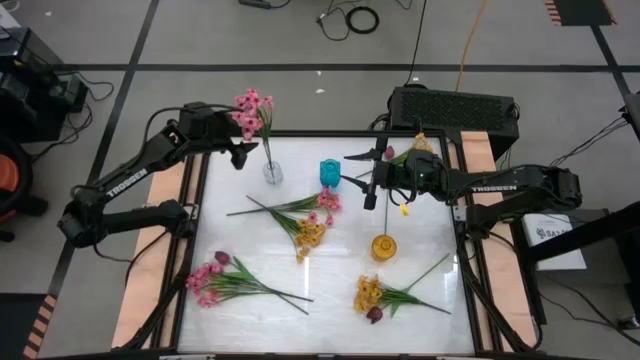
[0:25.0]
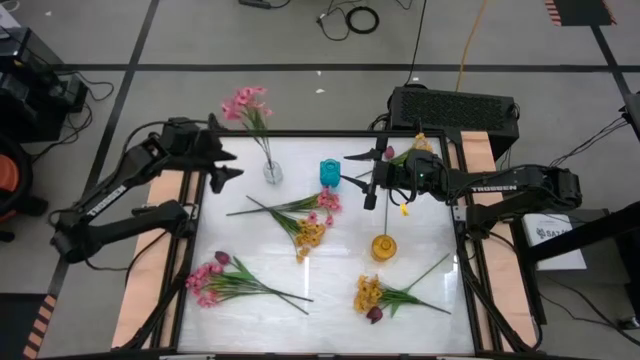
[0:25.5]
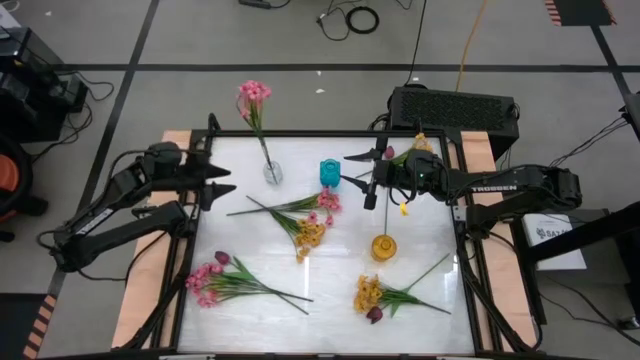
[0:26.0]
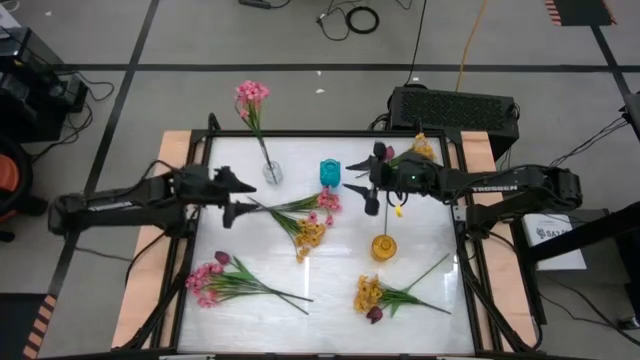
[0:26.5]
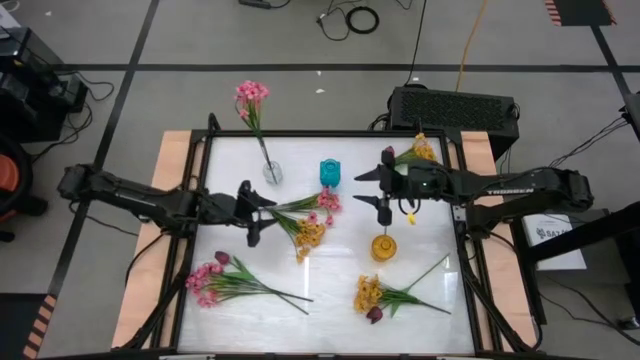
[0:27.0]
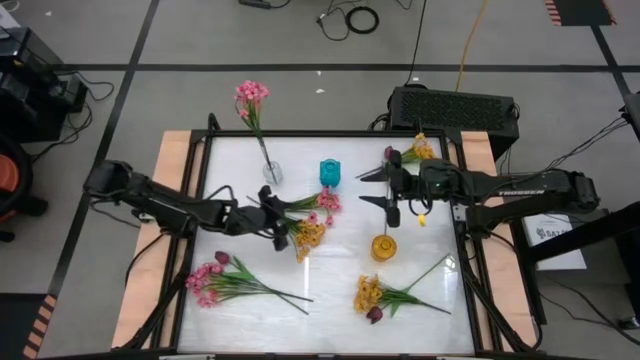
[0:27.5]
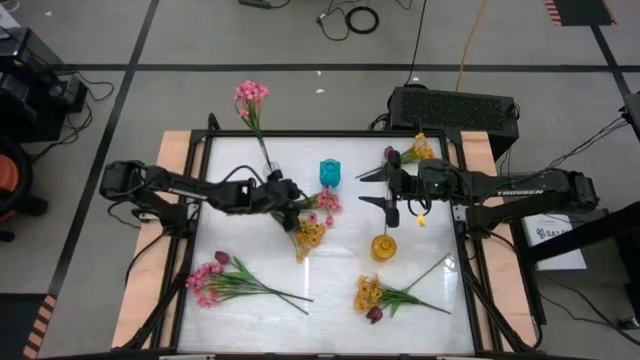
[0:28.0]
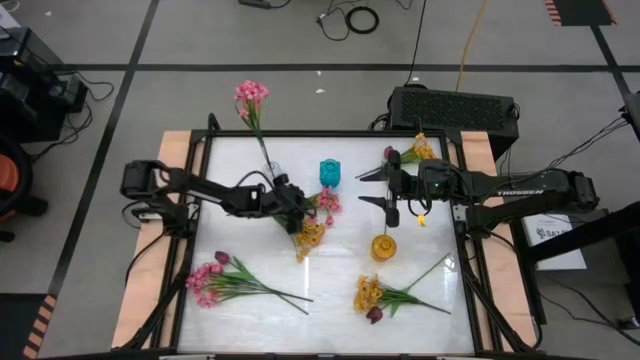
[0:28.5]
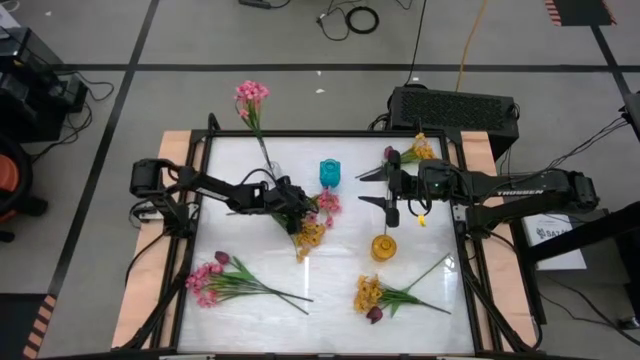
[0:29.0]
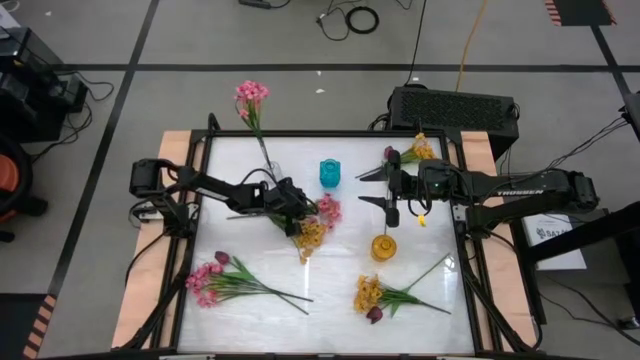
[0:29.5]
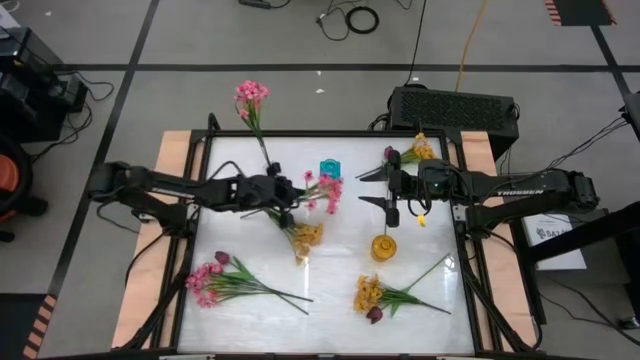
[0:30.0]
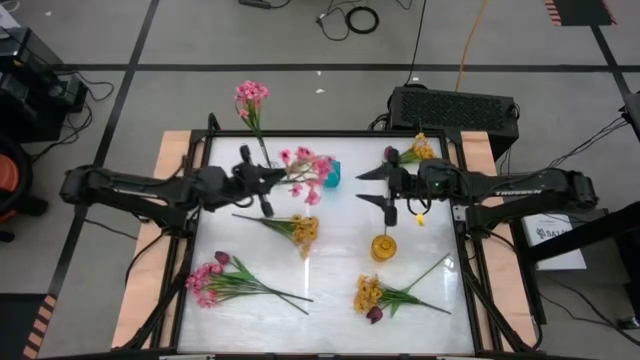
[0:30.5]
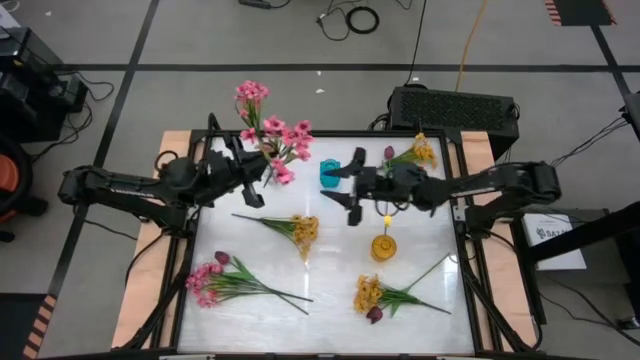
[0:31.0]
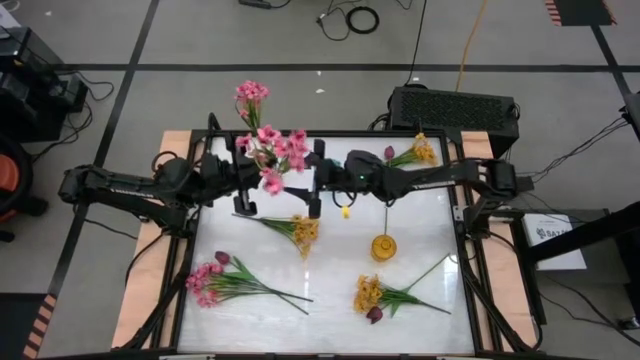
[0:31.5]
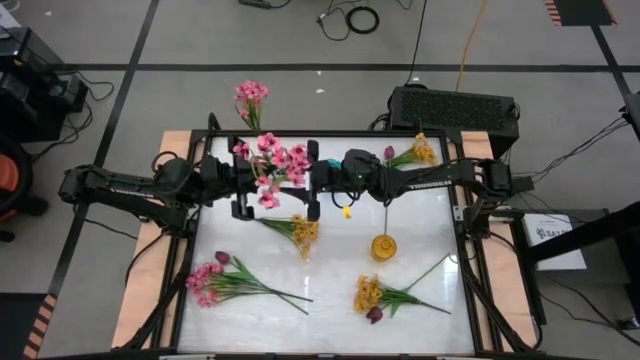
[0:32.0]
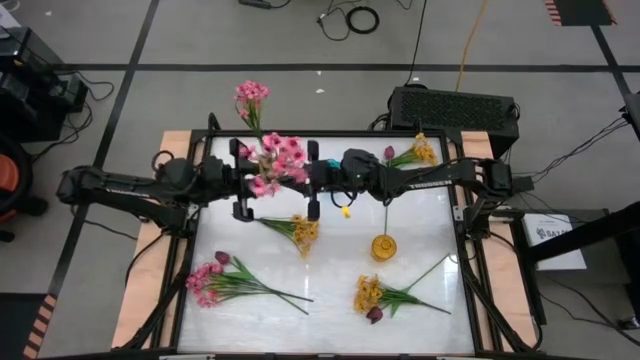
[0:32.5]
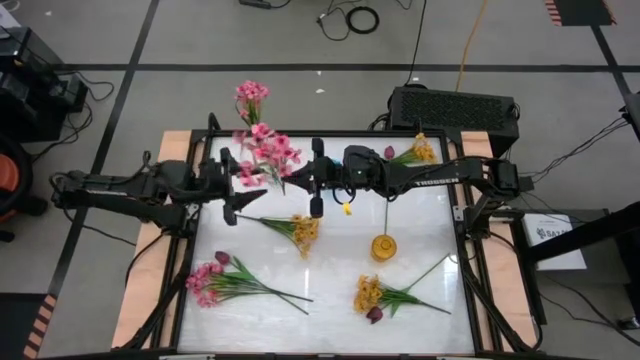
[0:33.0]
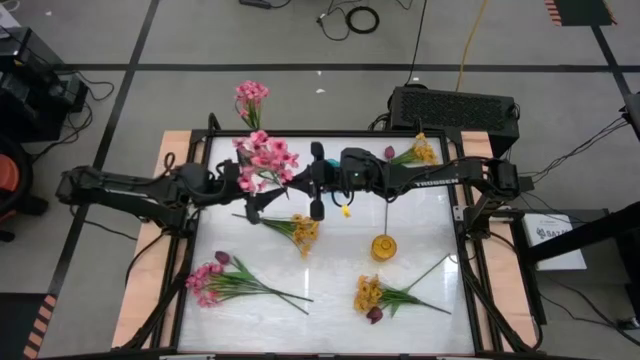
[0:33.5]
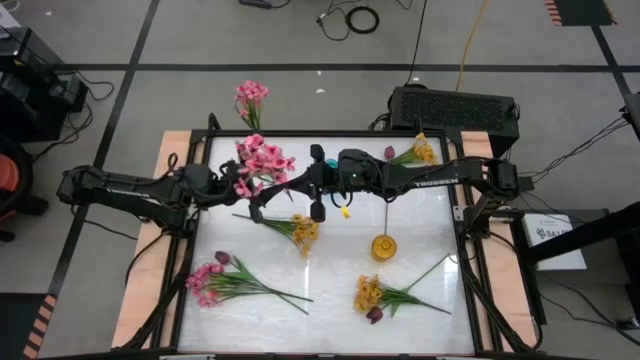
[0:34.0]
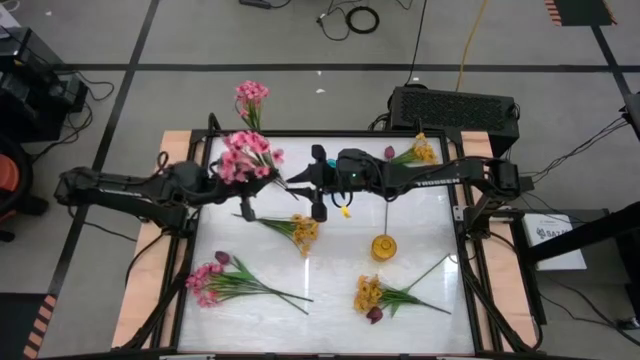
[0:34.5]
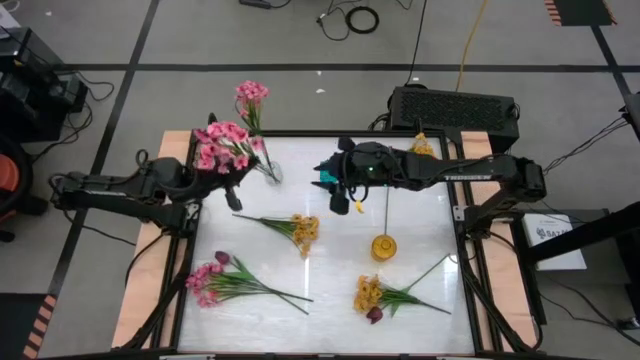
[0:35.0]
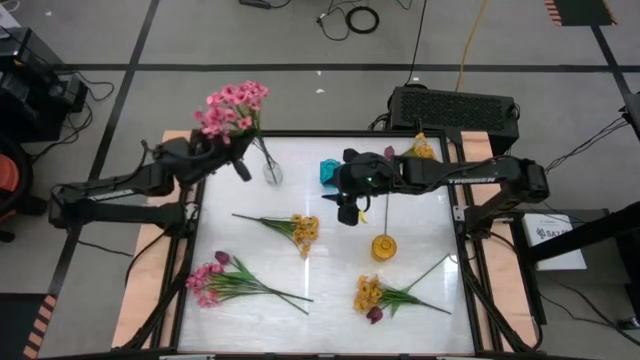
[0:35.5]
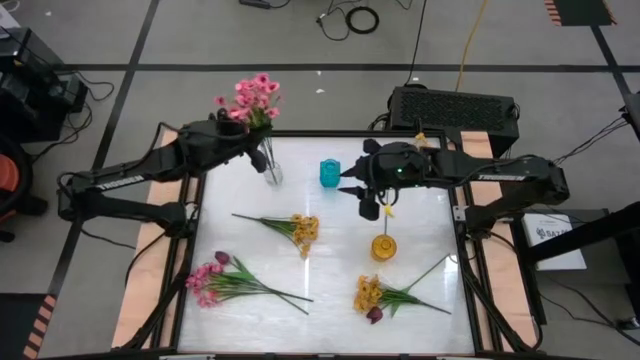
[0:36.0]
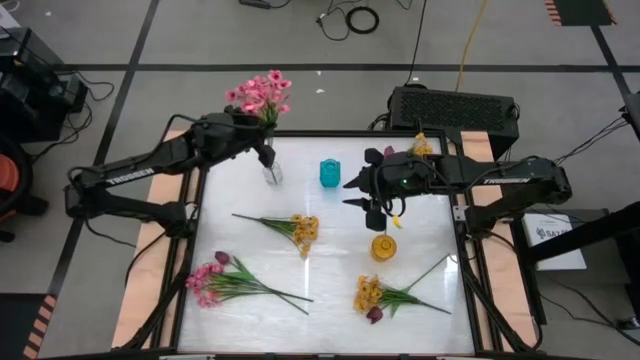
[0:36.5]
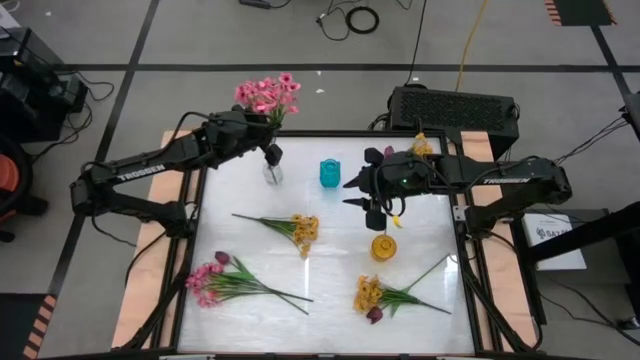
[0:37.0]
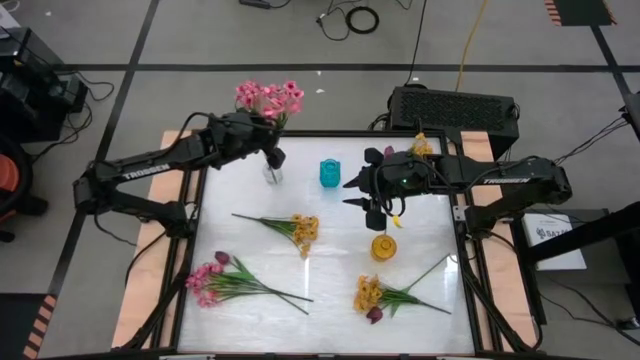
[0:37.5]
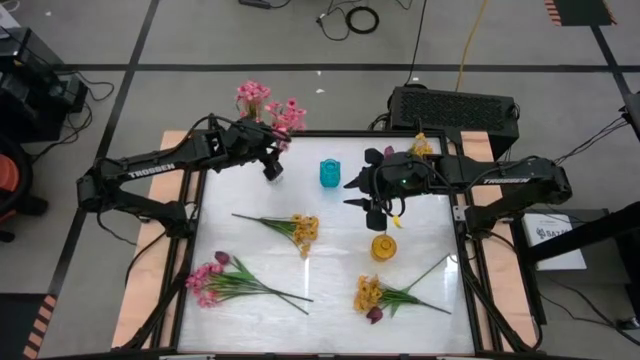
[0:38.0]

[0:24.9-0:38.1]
Task: Sort flowers into vase by color
Put the top pink flowers into the transparent vase

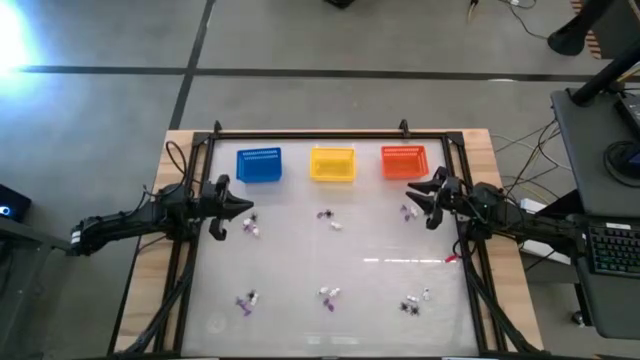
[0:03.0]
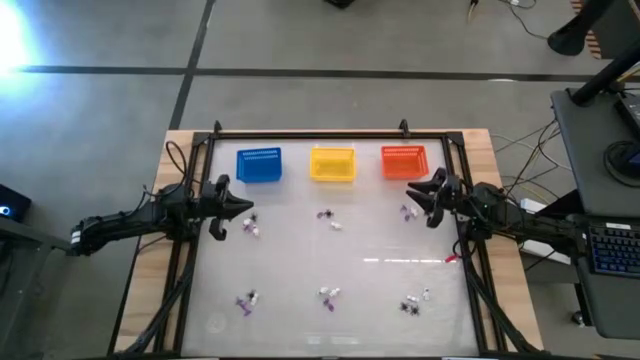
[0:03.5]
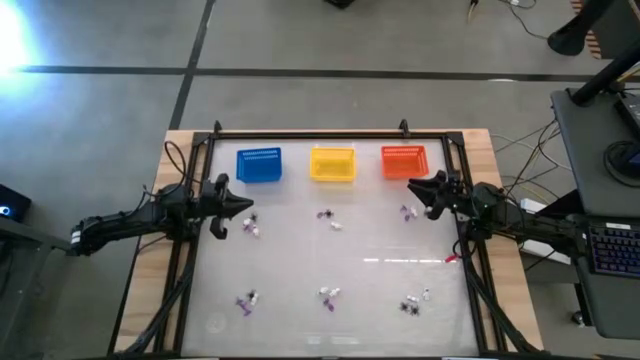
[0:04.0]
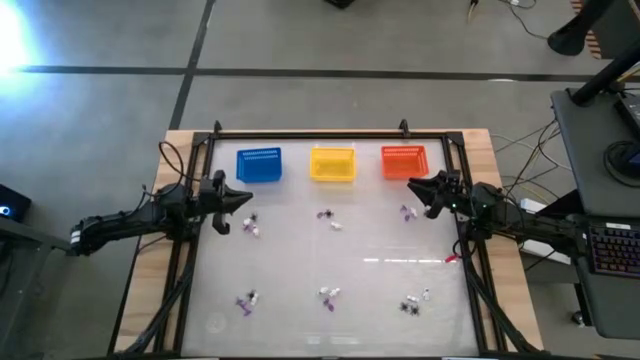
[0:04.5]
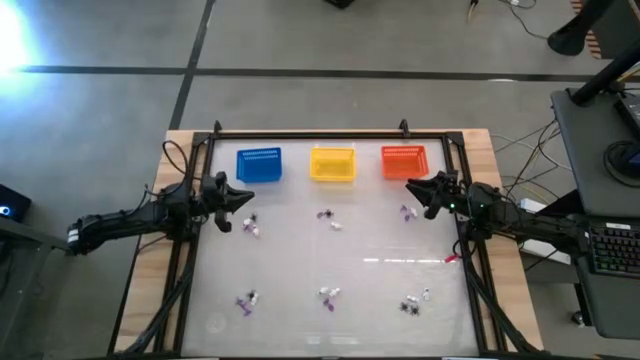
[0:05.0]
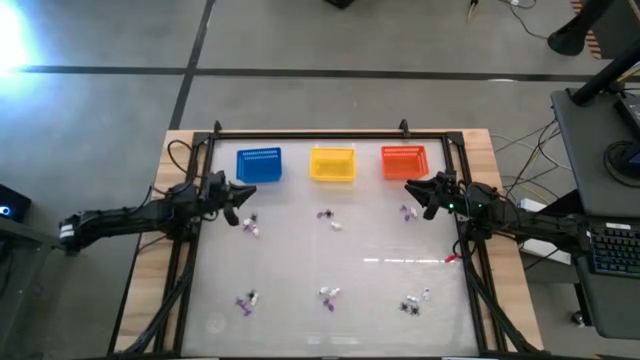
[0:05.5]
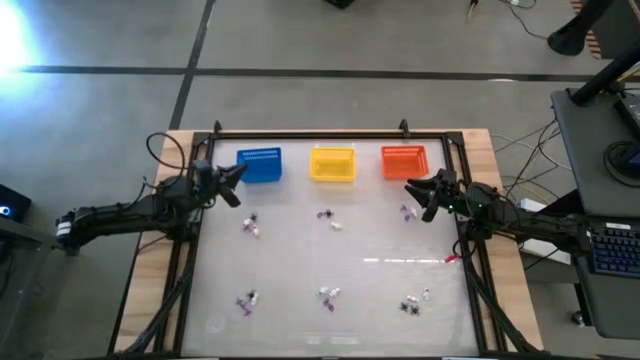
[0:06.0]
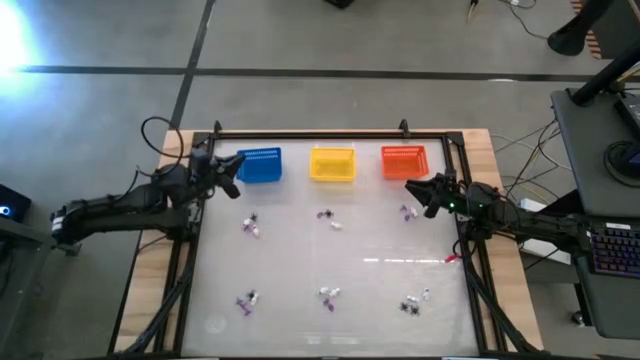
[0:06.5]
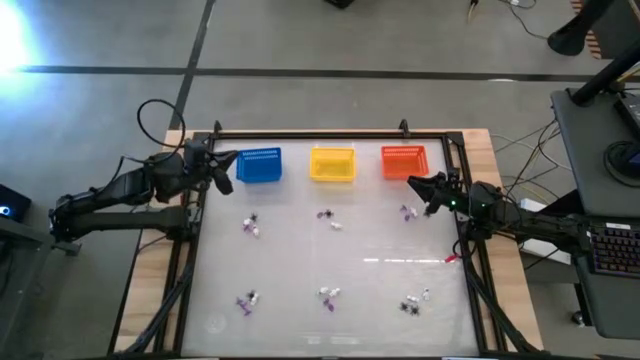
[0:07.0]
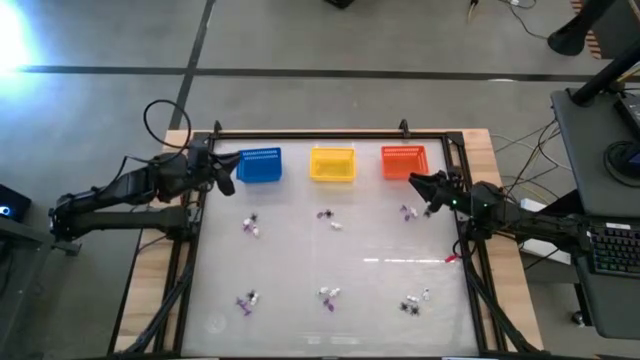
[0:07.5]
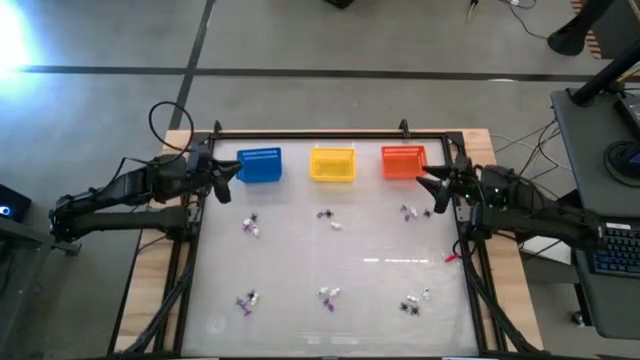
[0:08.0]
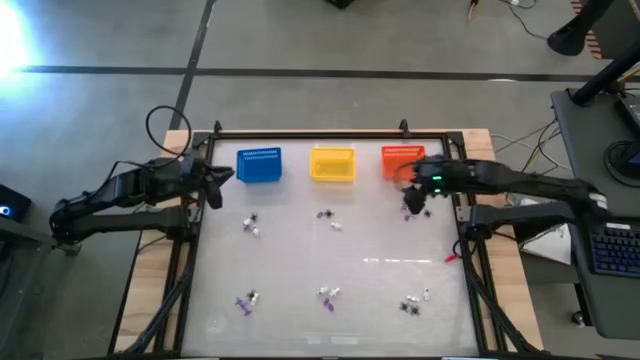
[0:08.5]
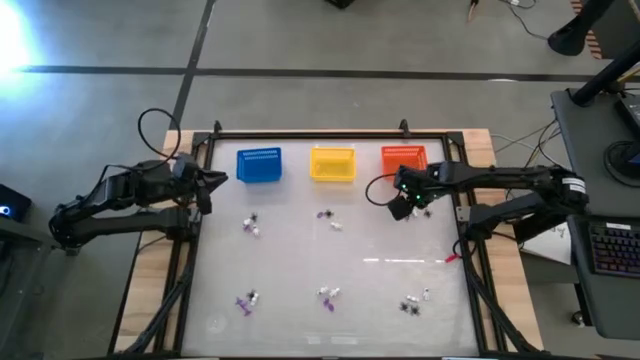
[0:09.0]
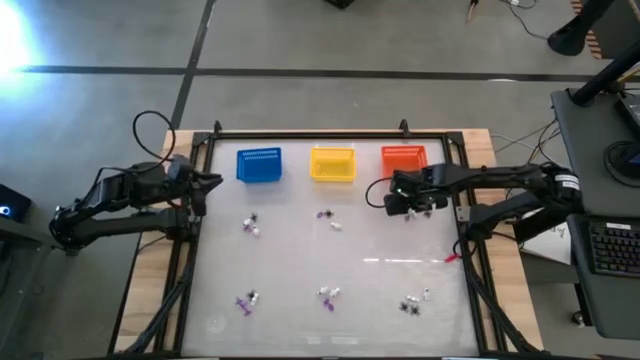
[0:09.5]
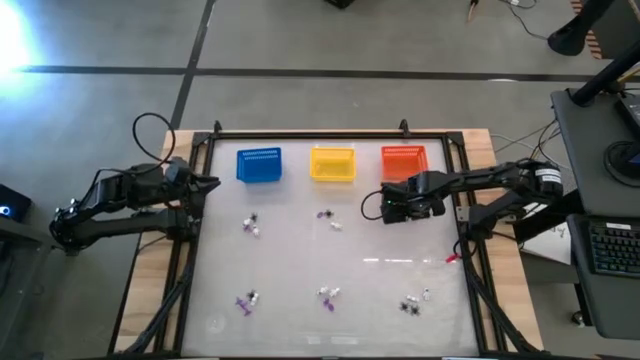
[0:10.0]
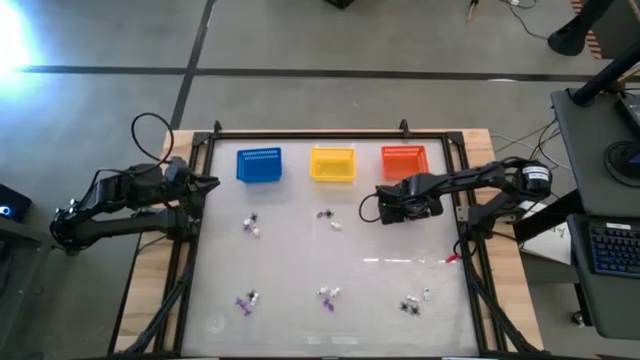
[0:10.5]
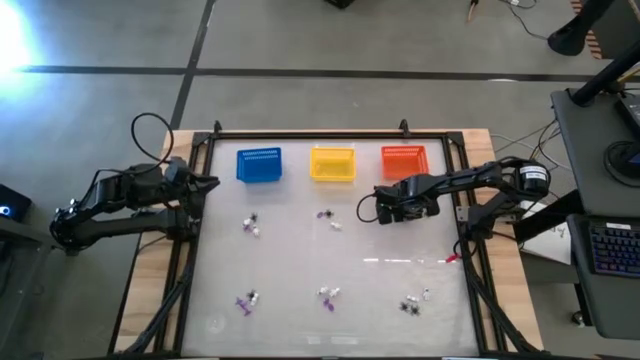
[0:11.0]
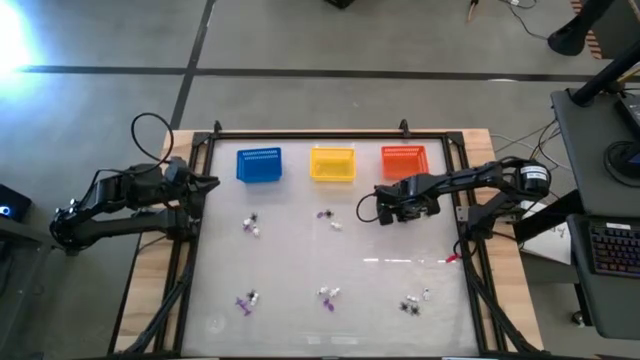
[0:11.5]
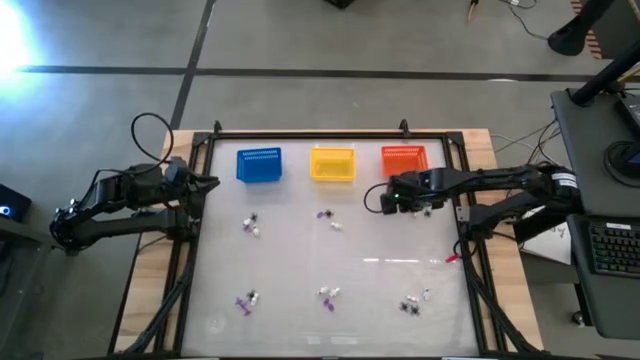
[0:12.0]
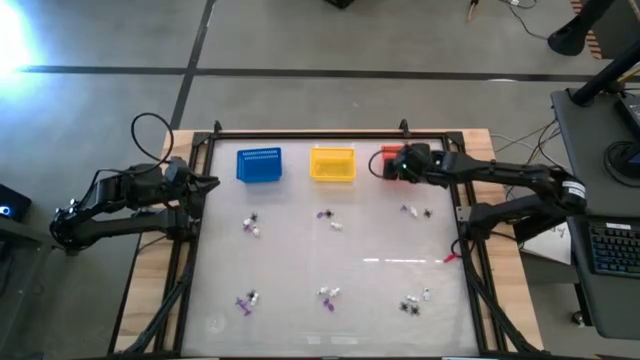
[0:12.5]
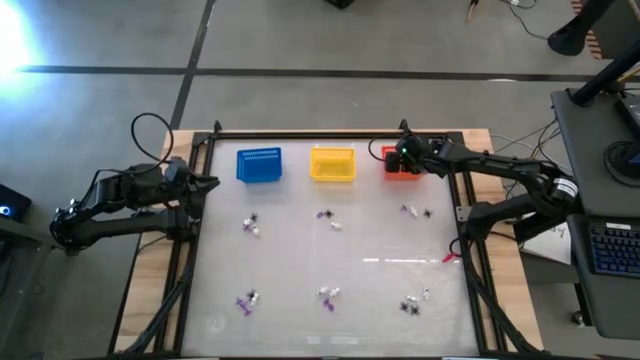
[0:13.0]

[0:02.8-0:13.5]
Task: Sort Halloween decoration
Put the purple hat toy into the orange bin
